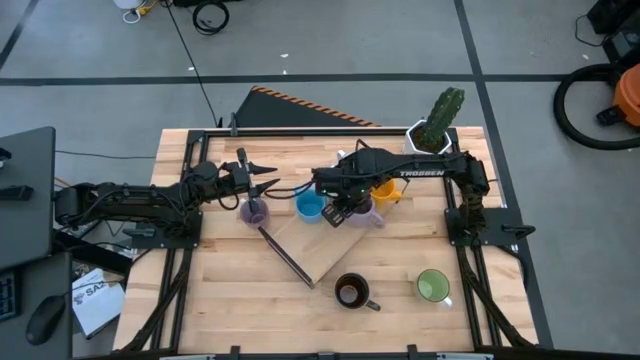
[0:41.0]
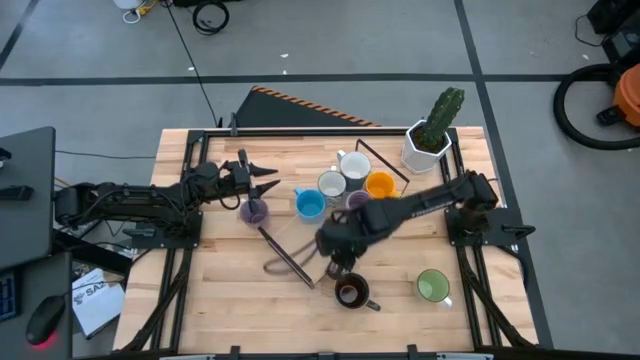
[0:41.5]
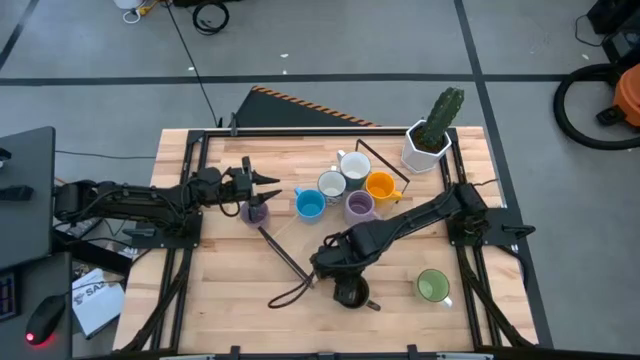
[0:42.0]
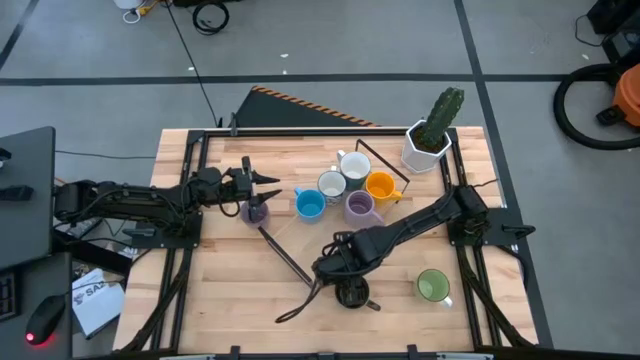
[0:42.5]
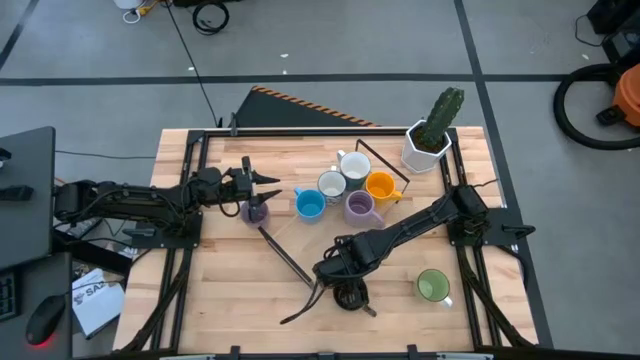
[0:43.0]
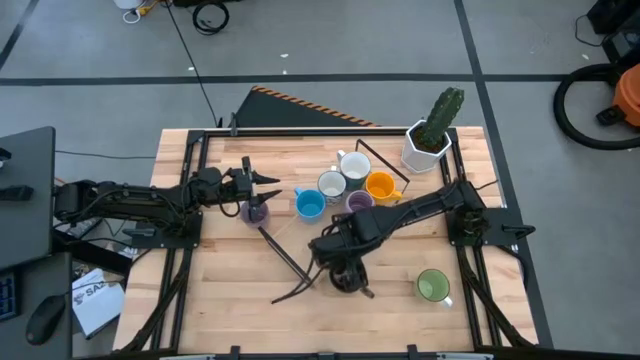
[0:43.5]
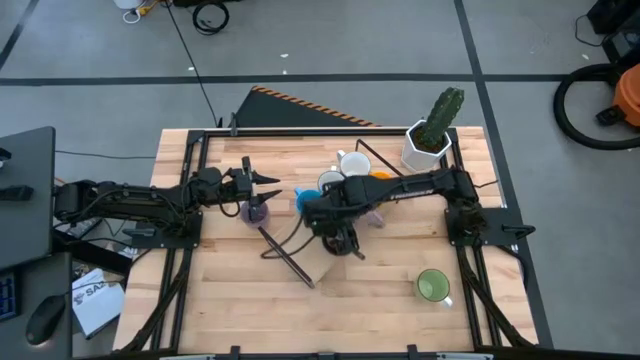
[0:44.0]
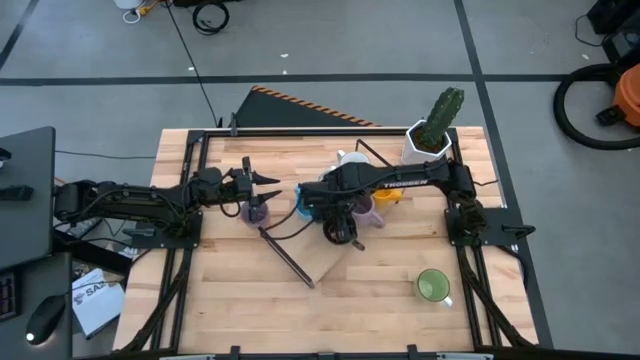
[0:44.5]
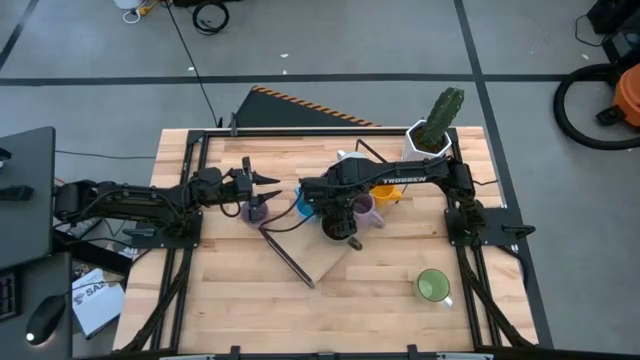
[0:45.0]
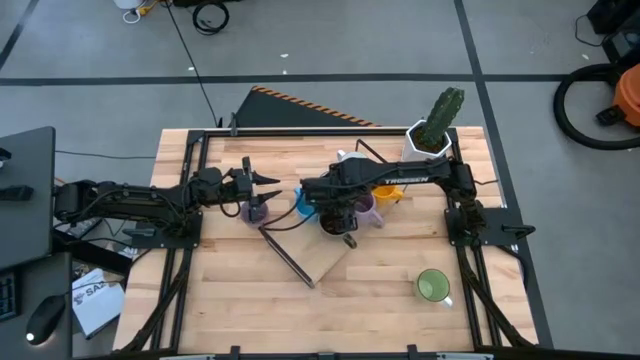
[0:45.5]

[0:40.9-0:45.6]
Task: Place coffee mugs
Put the brown mug on the shelf

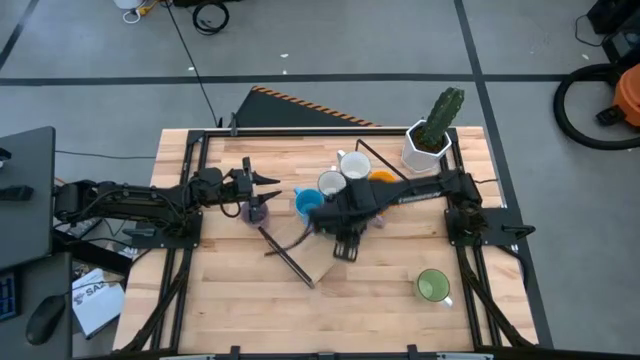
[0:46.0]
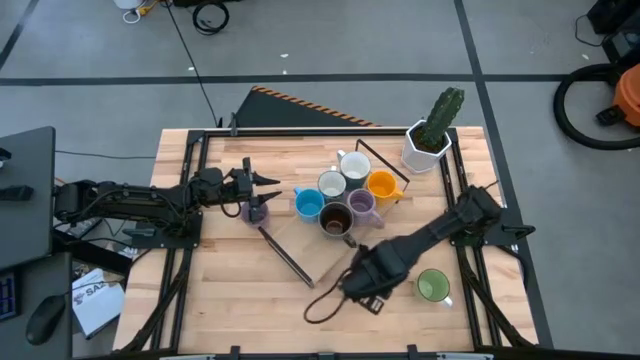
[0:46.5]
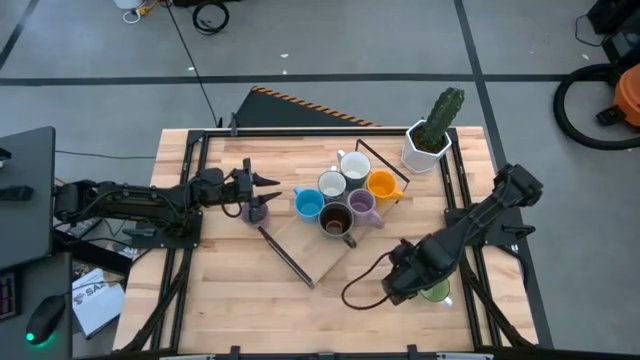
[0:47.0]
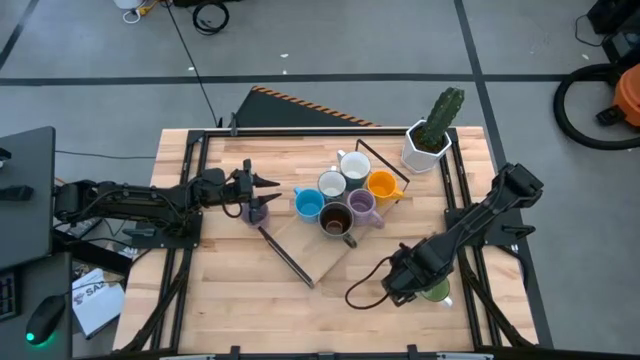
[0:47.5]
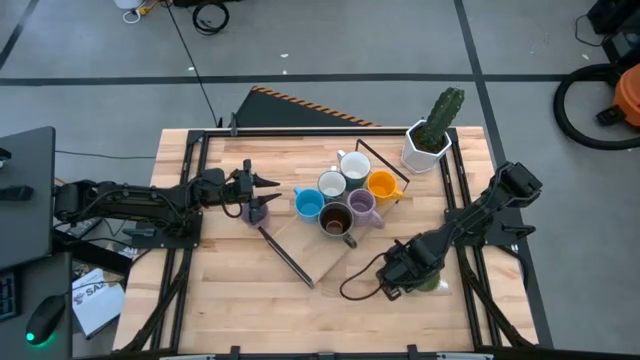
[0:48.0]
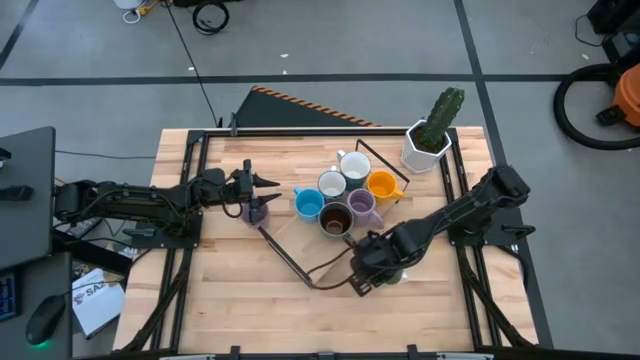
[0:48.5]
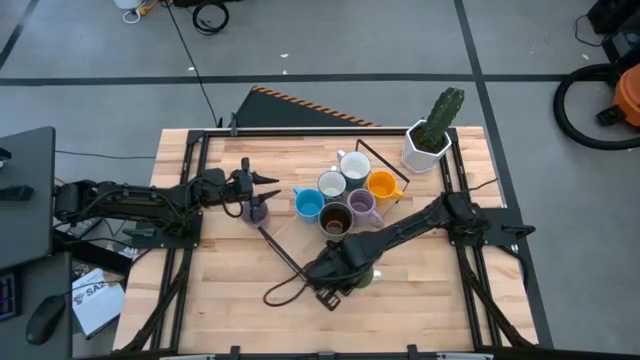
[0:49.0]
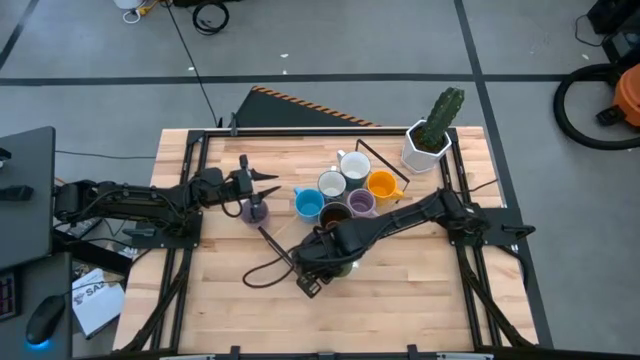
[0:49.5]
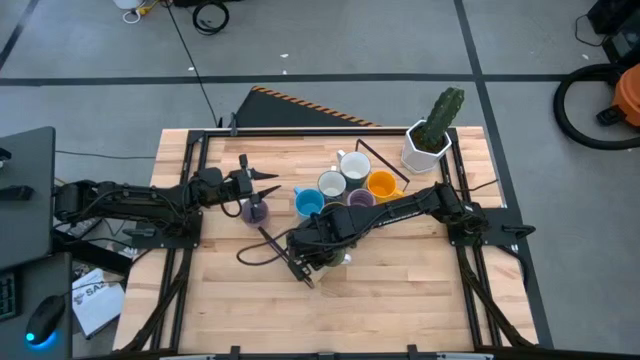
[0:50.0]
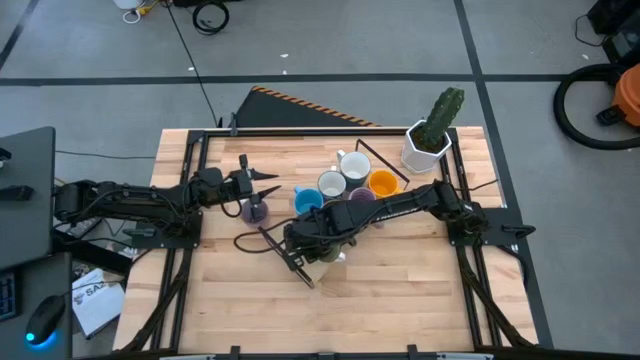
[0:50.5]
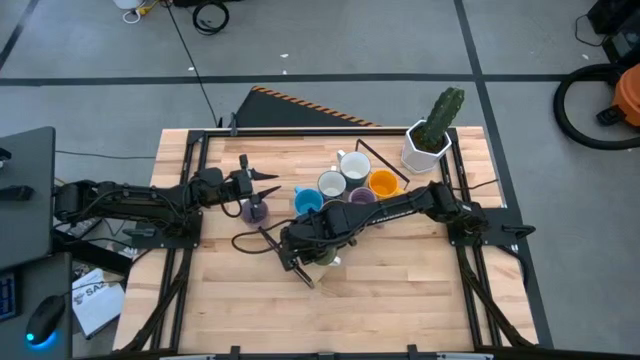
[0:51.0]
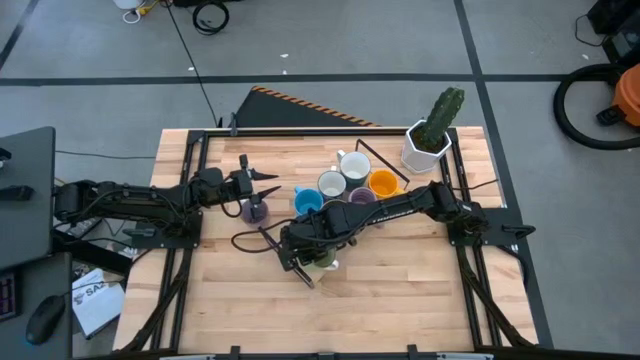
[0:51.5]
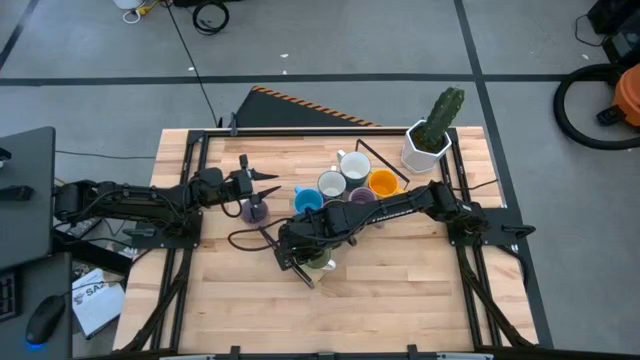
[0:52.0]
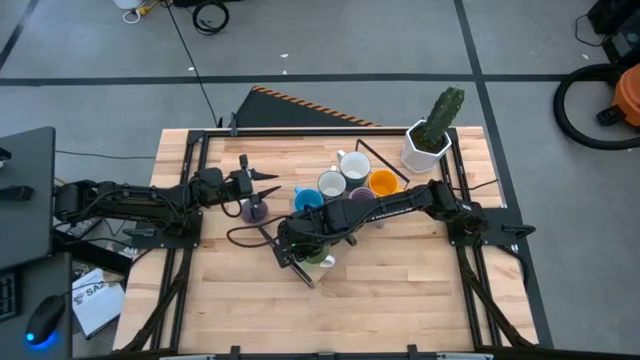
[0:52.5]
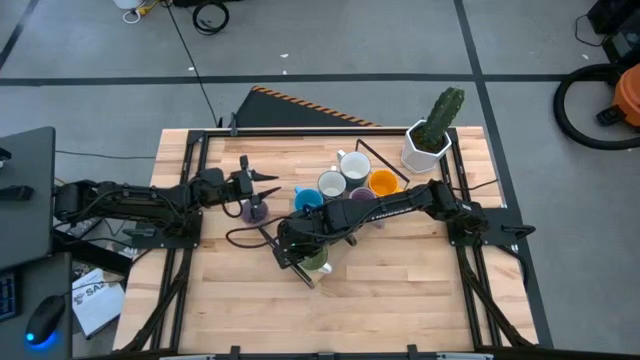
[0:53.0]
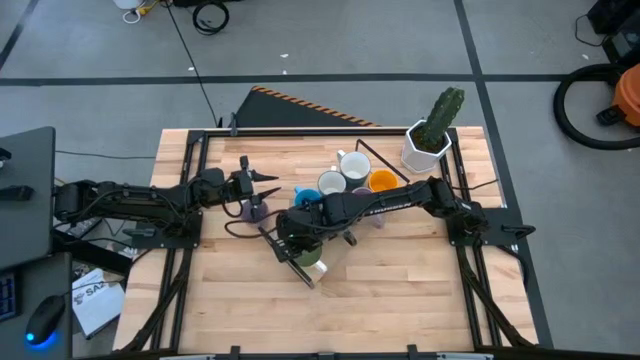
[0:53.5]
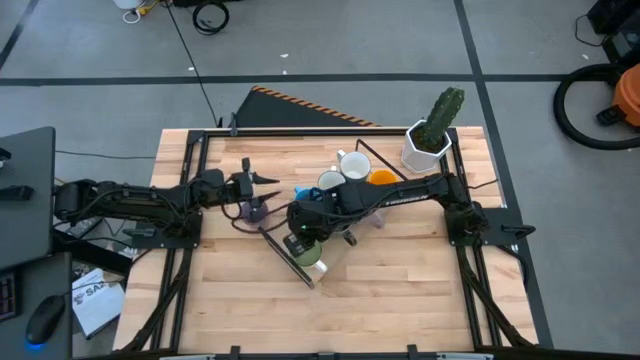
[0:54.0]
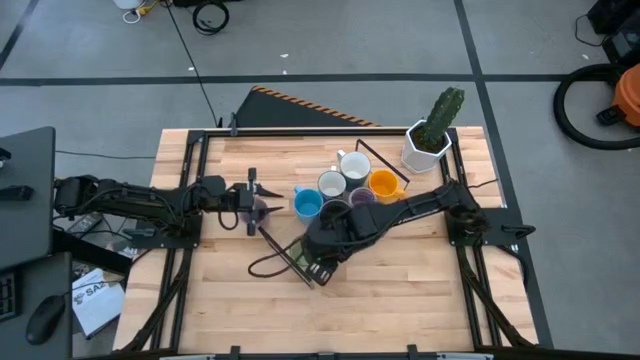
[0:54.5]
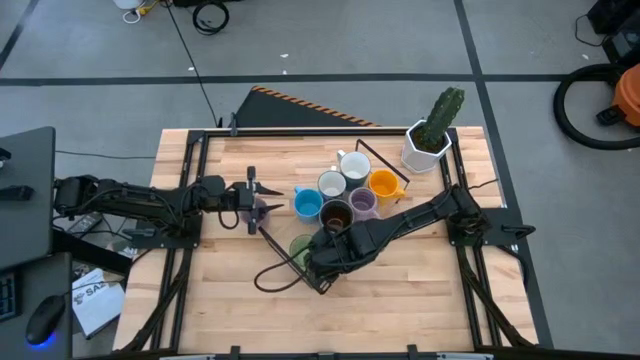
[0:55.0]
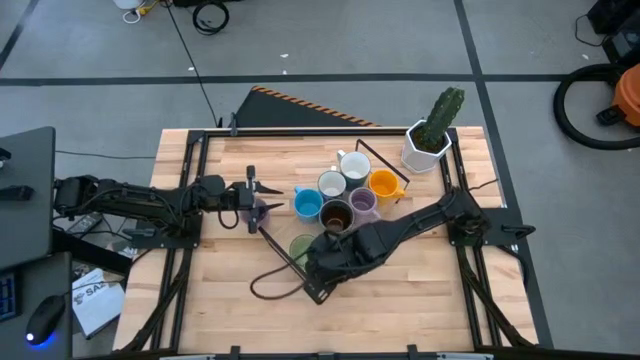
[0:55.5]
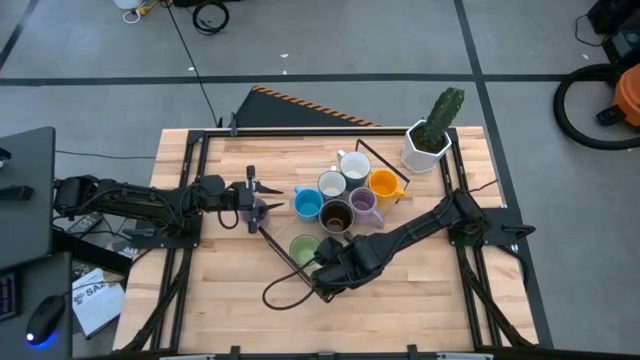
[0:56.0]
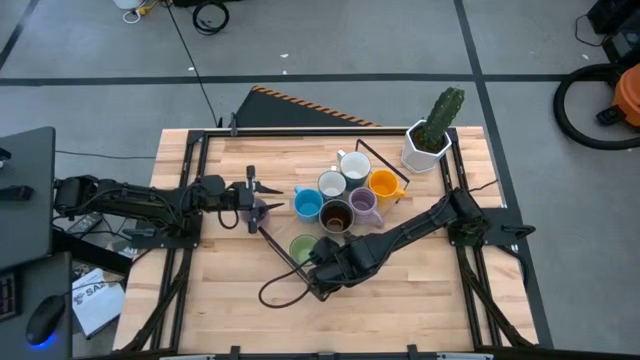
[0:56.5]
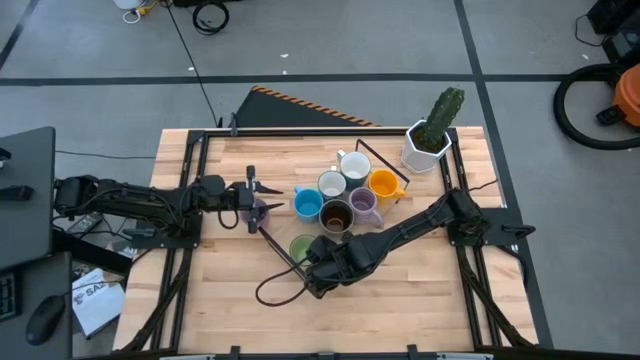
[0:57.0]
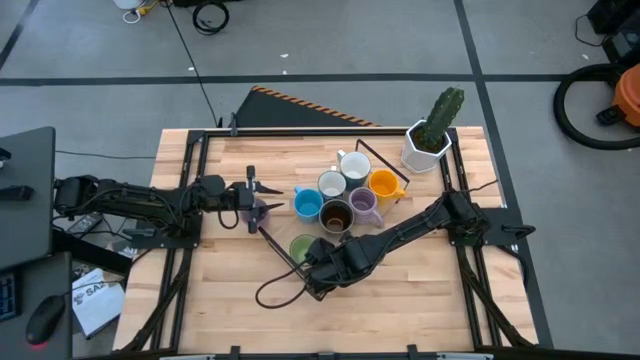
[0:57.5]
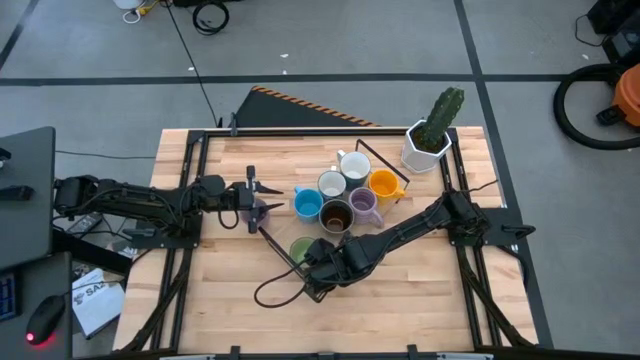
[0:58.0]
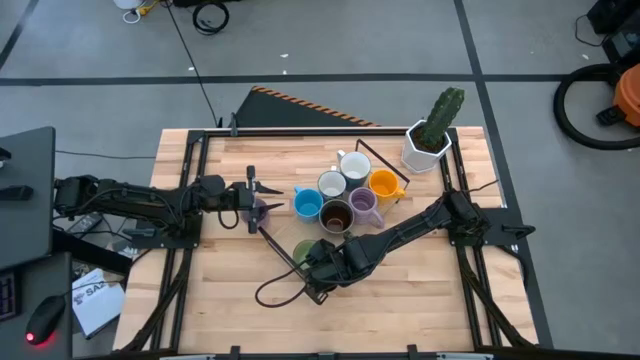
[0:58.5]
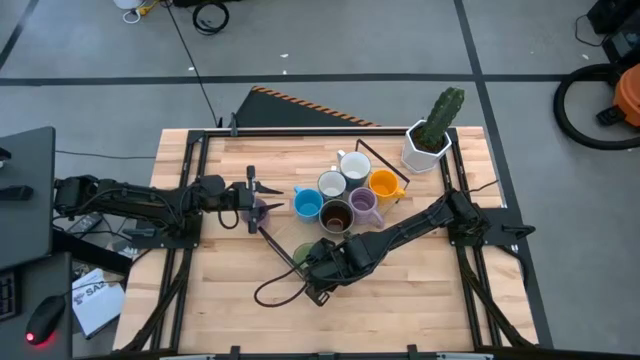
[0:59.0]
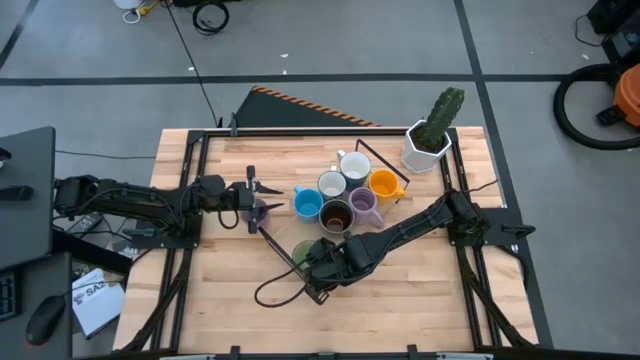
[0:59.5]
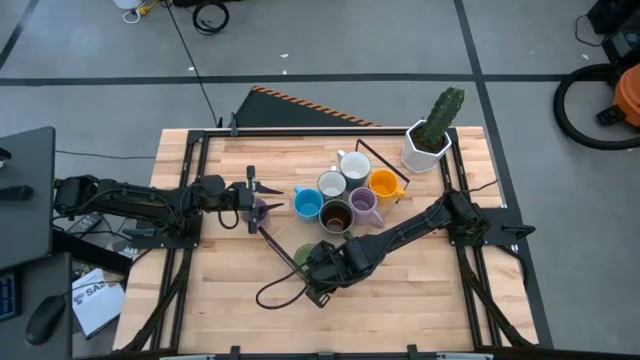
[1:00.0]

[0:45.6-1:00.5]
Put the green mug on the shelf

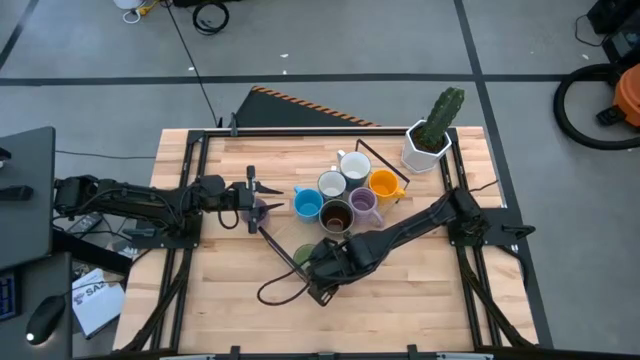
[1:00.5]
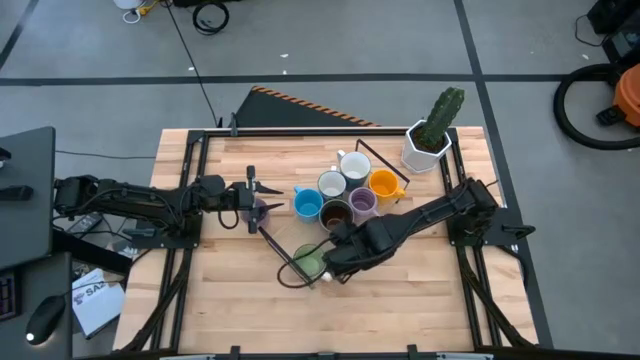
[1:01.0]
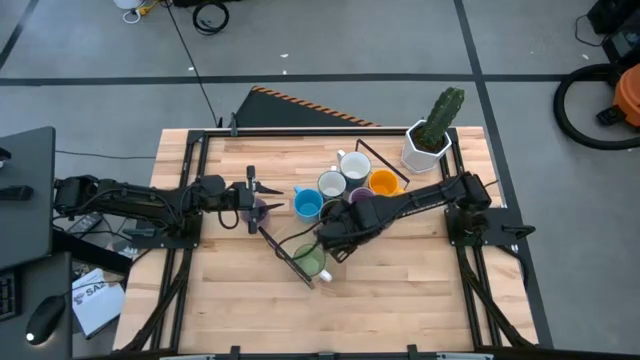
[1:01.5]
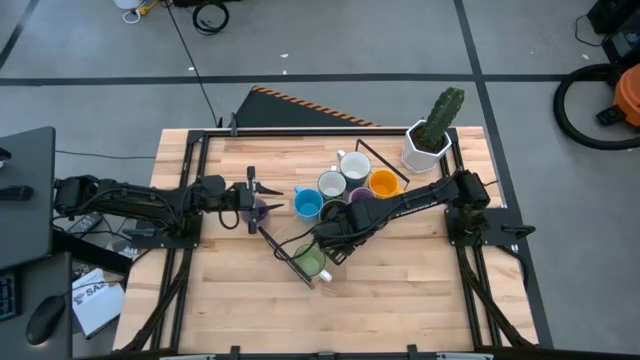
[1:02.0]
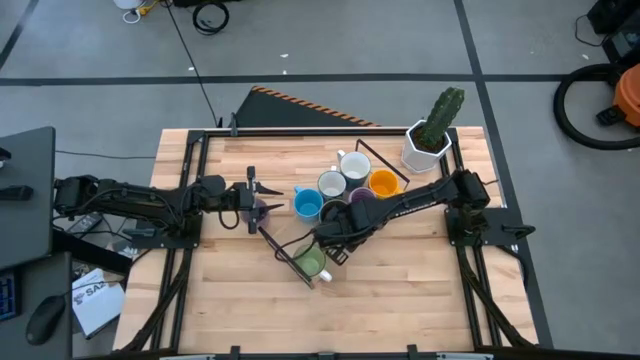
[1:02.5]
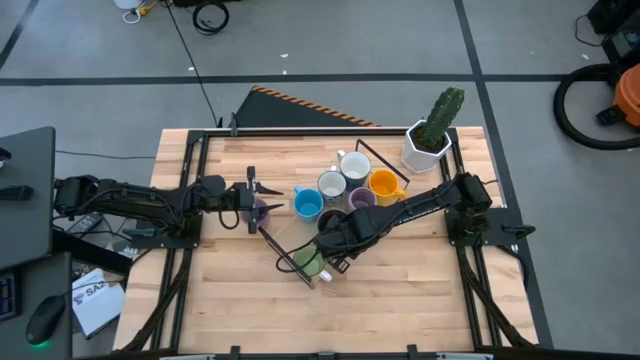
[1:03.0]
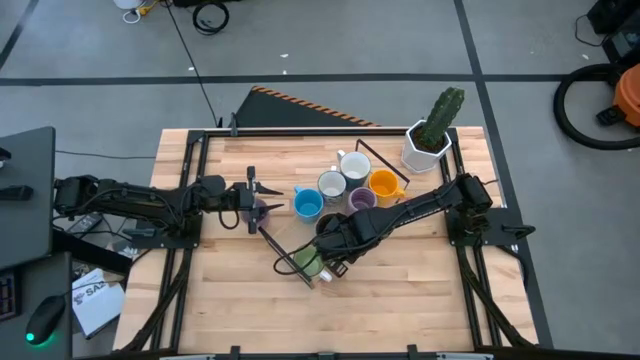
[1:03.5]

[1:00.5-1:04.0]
Adjust the brown mug on the shelf
